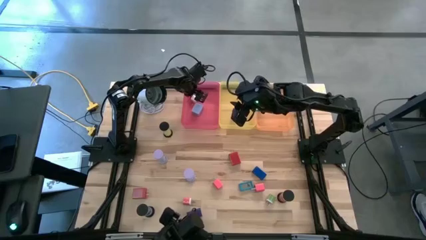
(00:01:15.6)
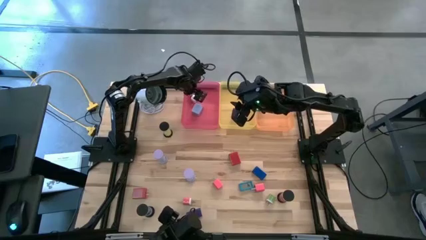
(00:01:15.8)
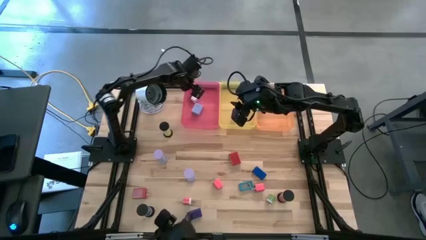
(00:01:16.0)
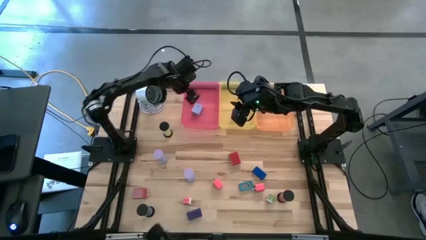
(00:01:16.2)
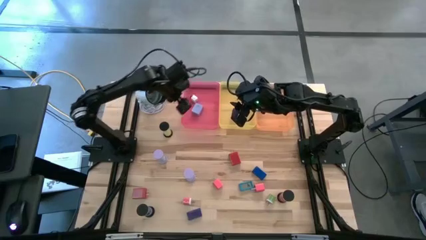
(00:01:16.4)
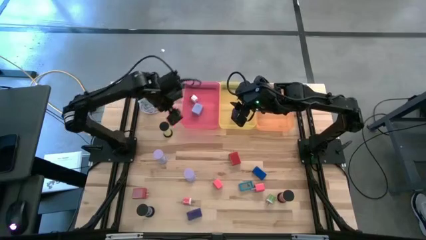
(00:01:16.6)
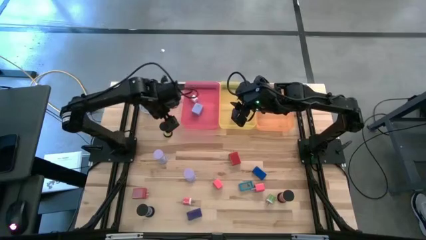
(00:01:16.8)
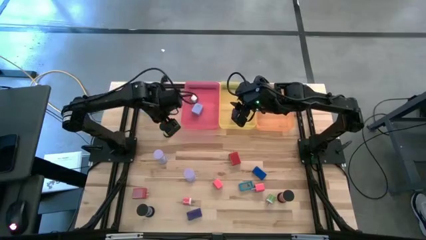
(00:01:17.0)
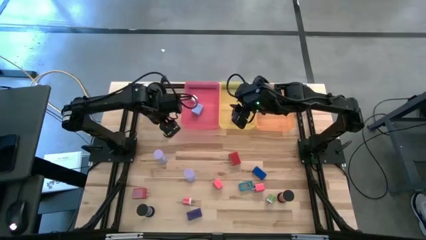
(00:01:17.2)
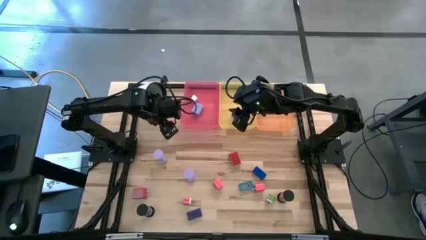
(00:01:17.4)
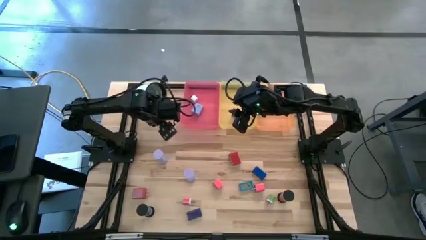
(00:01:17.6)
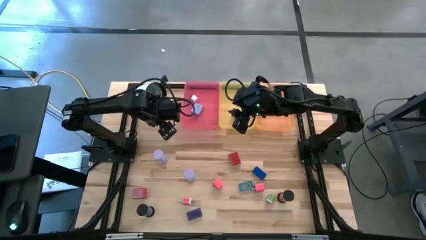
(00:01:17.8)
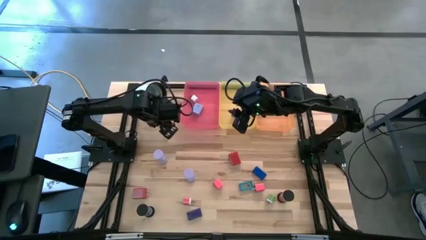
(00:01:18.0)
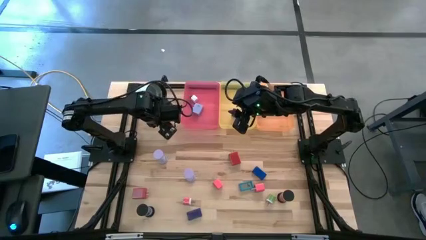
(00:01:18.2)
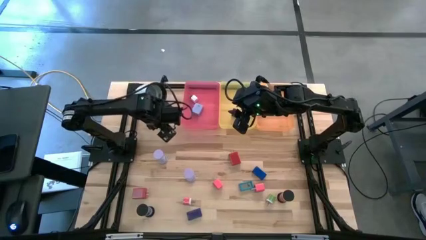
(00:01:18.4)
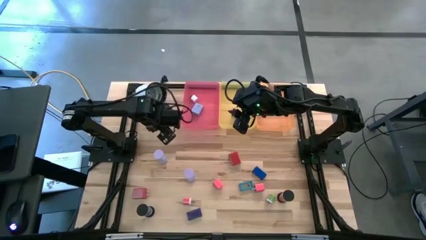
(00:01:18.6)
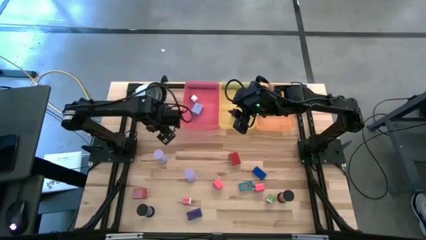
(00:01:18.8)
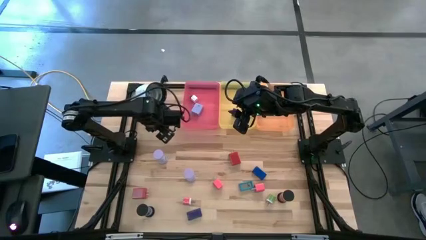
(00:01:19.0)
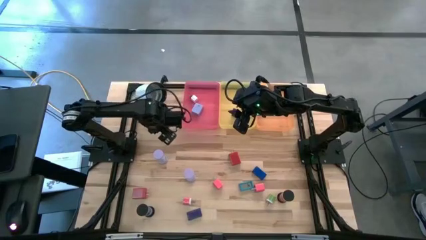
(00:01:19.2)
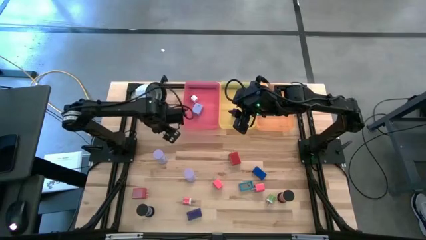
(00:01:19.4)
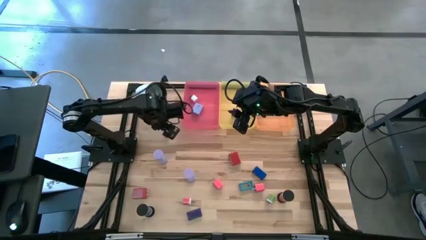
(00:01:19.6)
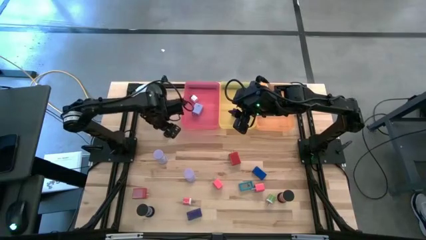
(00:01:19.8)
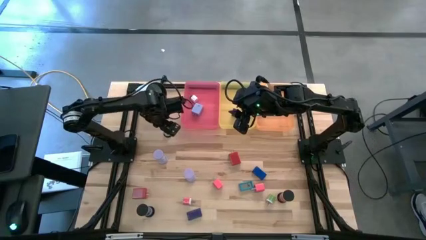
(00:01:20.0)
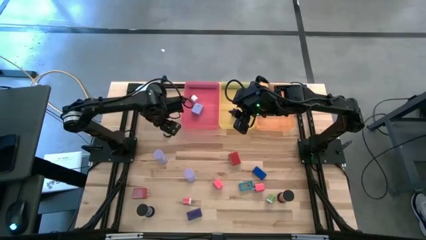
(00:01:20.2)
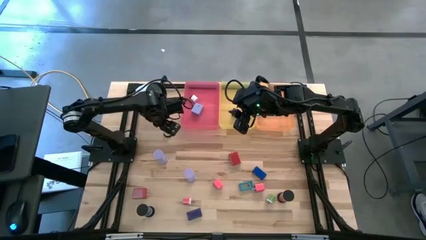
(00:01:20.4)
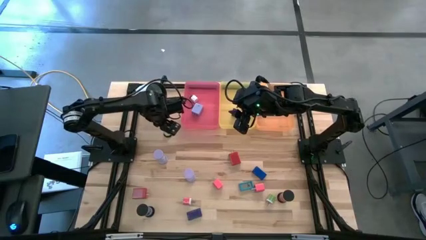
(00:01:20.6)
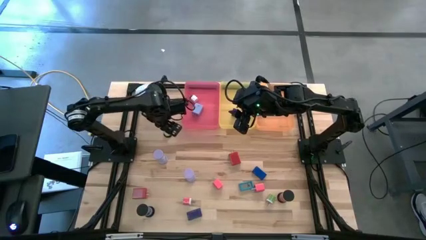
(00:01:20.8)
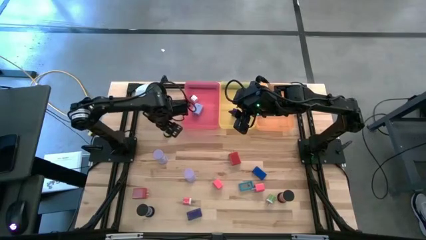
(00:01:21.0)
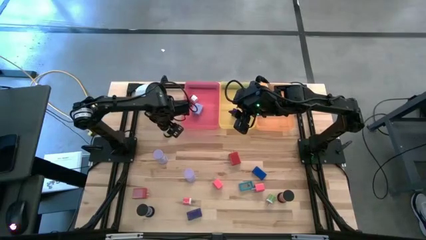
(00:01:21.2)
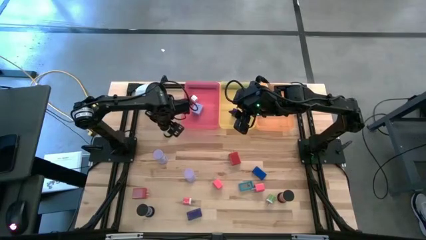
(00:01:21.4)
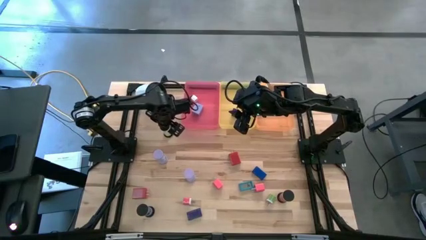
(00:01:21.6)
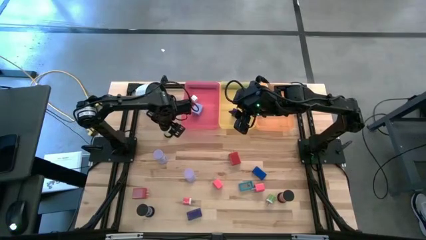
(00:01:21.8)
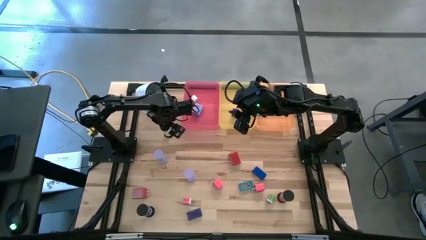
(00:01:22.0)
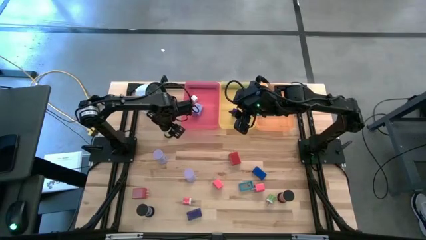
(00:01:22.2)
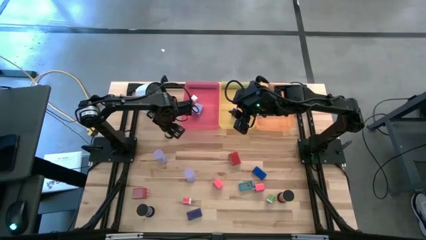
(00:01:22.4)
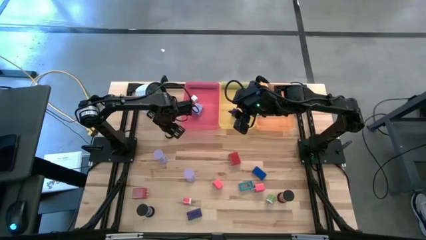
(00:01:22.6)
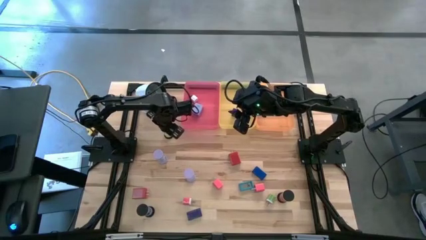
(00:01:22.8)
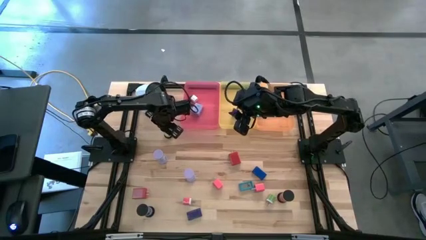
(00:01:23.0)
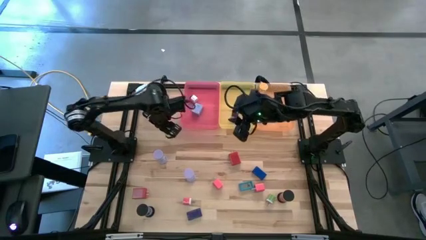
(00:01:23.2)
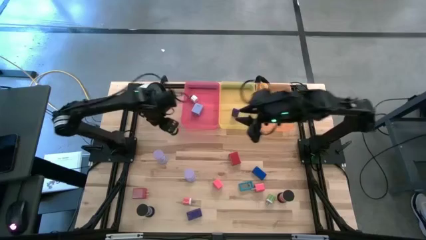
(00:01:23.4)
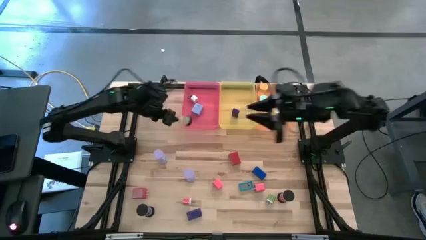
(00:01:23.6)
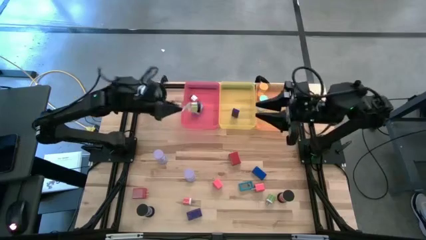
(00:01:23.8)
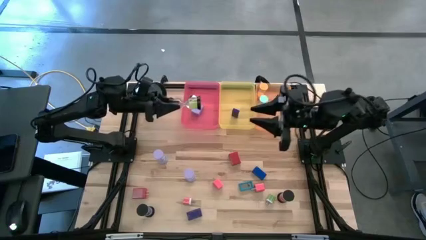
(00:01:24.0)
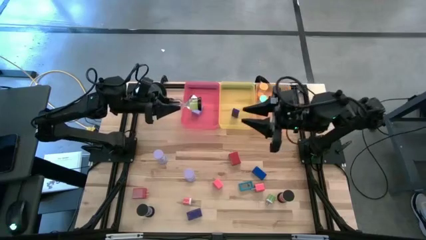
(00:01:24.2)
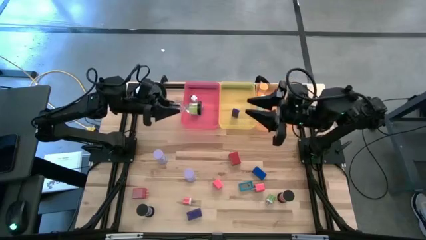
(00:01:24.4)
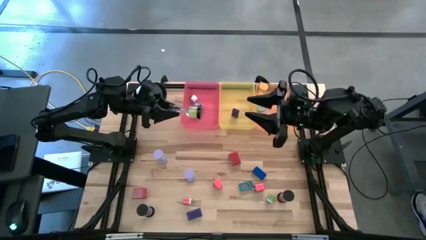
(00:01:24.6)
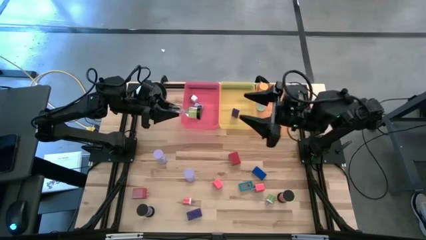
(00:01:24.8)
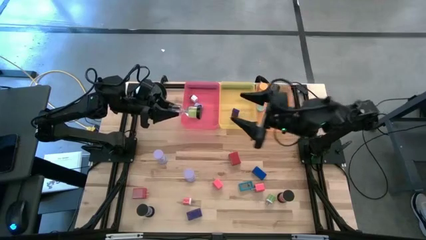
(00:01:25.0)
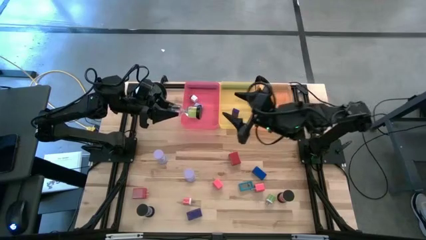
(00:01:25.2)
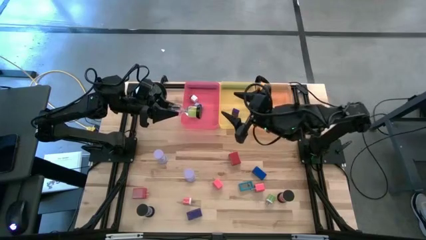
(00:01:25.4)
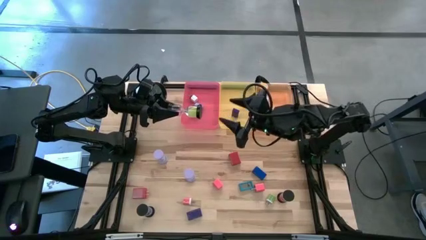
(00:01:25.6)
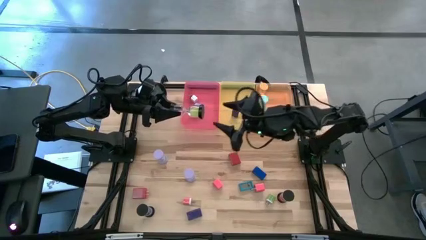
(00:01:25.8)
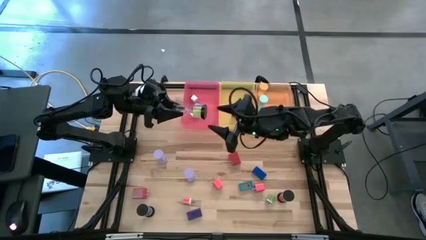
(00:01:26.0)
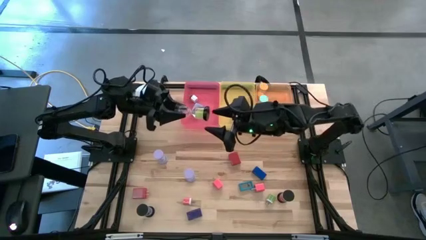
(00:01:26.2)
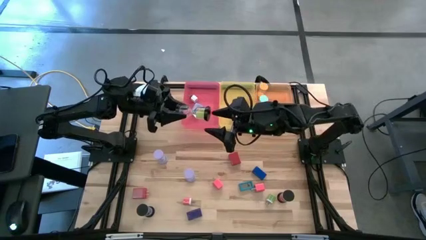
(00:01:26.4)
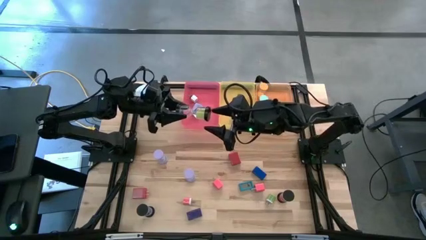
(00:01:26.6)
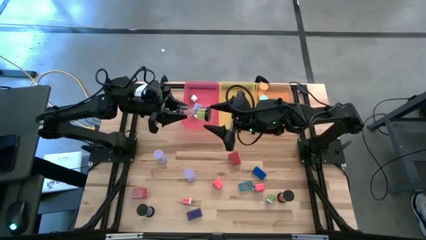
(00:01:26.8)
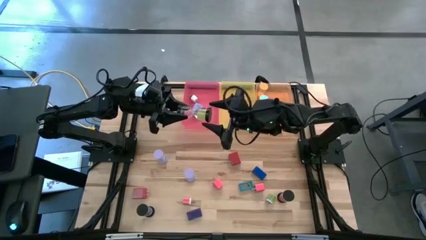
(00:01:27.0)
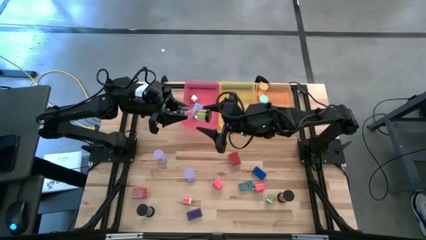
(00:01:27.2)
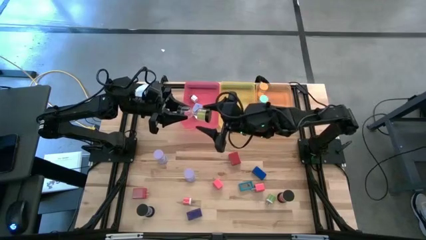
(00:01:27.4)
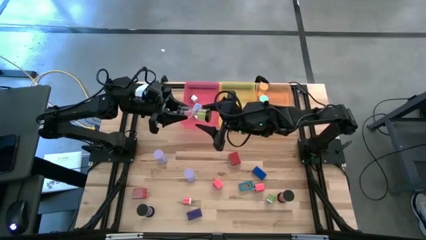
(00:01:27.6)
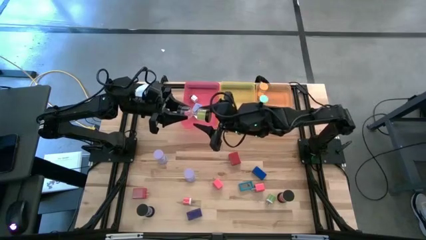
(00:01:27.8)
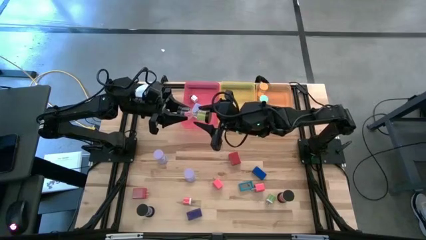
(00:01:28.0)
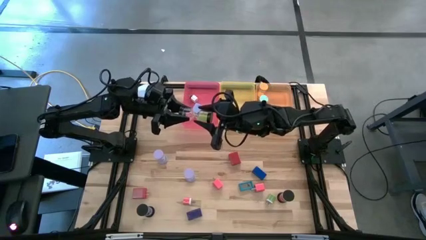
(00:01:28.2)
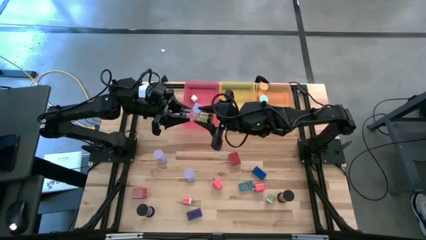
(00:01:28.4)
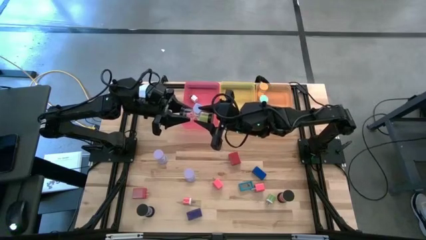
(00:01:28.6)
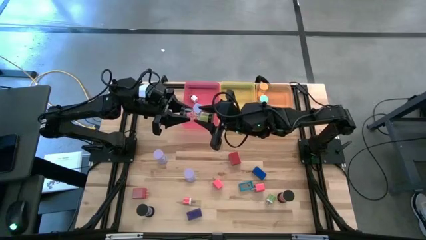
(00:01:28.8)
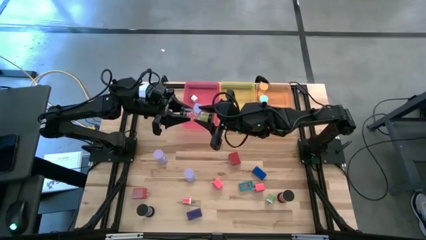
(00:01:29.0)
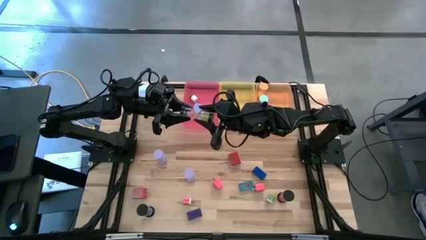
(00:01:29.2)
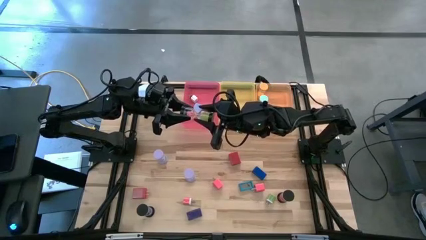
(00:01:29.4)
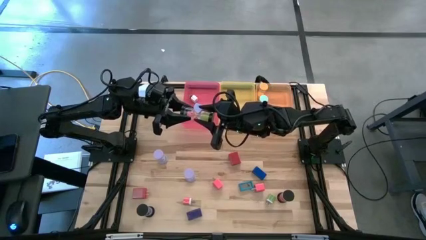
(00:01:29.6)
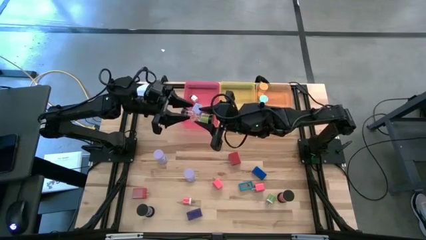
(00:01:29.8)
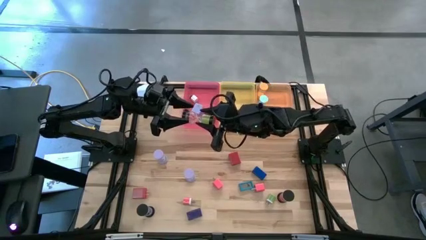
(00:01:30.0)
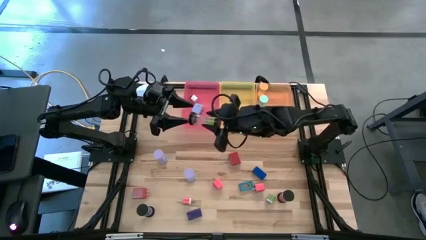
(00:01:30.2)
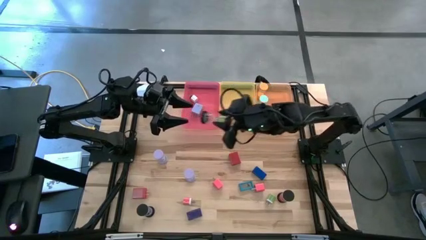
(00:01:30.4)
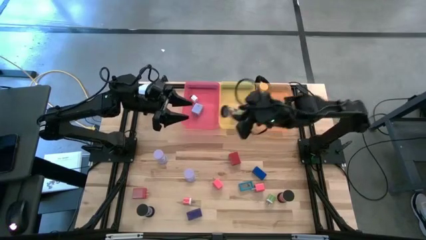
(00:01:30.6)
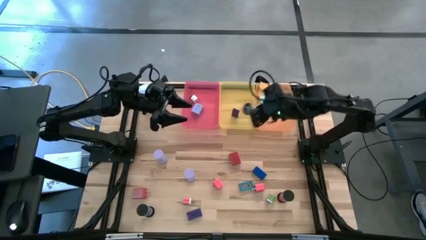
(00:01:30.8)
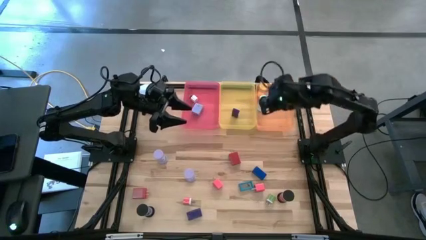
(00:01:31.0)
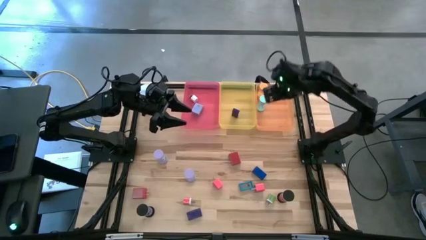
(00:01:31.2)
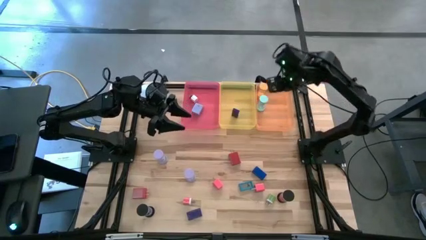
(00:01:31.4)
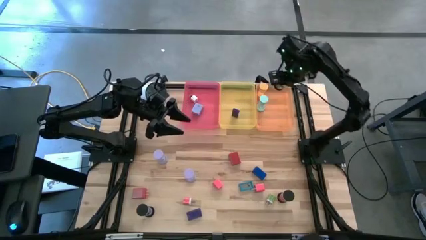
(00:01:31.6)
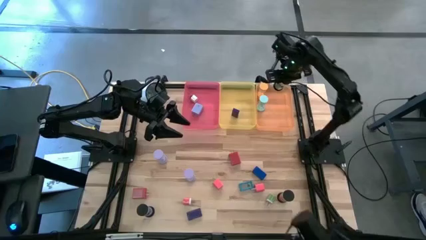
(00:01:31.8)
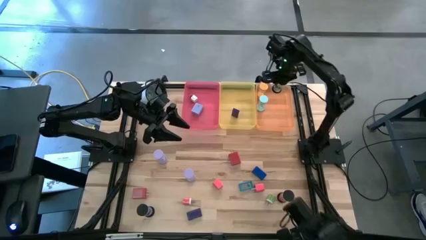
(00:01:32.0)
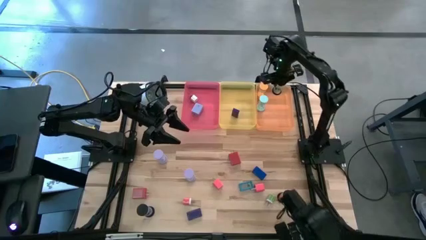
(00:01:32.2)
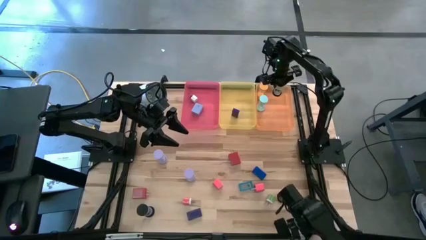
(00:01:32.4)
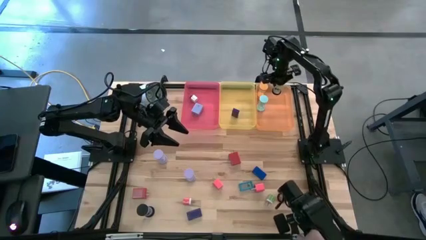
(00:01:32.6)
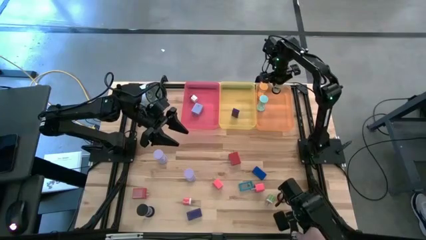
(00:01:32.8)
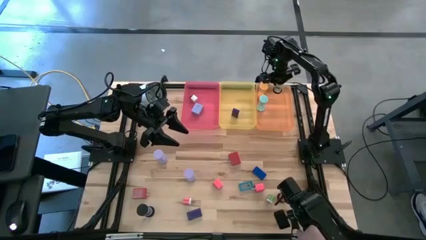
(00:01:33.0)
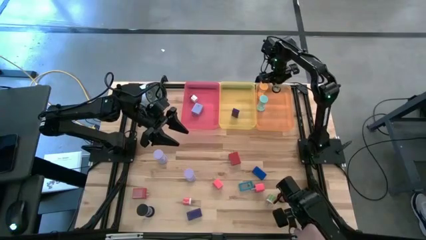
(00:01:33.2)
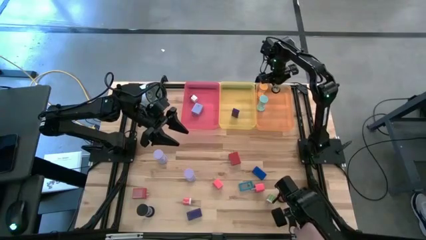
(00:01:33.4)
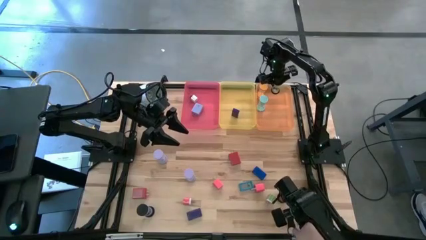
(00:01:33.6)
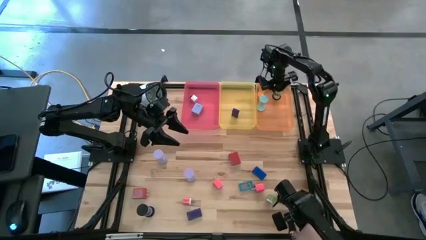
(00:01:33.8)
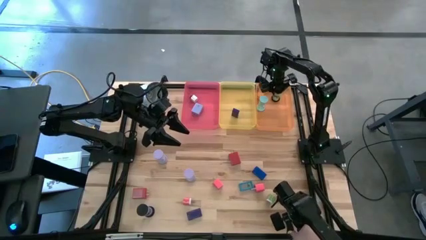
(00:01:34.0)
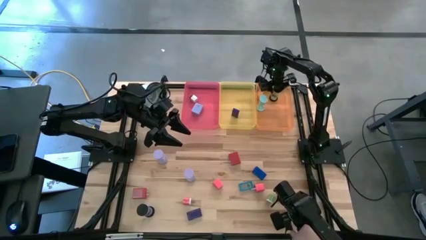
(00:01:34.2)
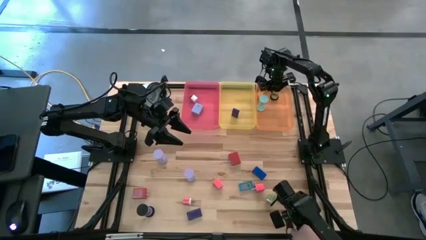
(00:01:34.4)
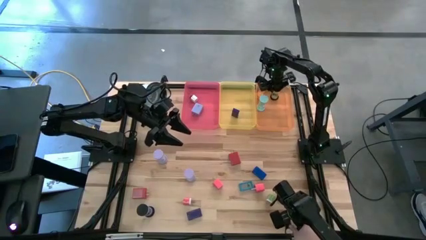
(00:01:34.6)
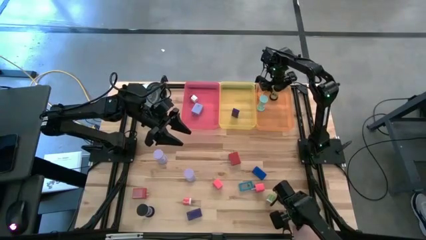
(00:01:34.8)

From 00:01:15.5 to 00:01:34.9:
Task: Pick & Place Office items
Put the black green hourglass into the orange bin
